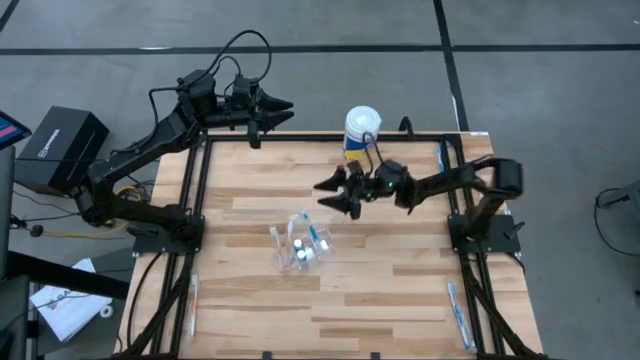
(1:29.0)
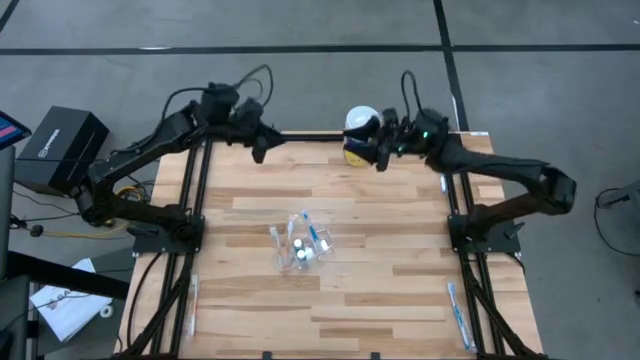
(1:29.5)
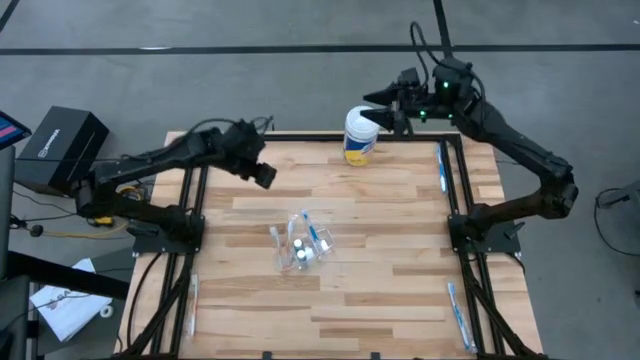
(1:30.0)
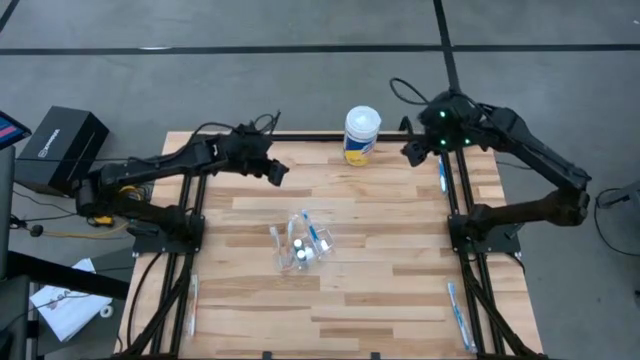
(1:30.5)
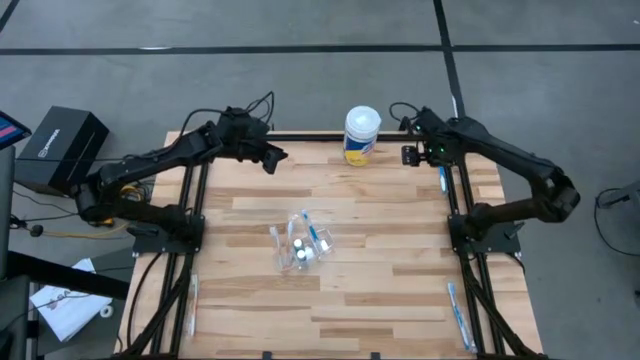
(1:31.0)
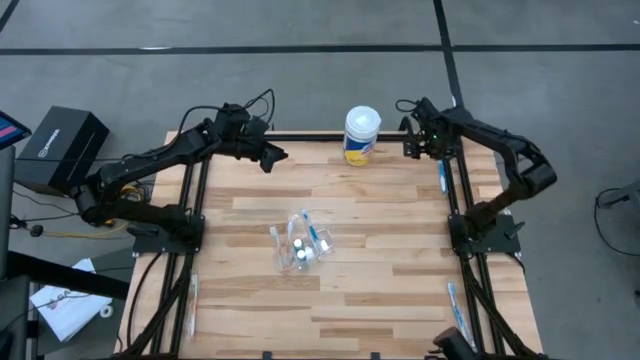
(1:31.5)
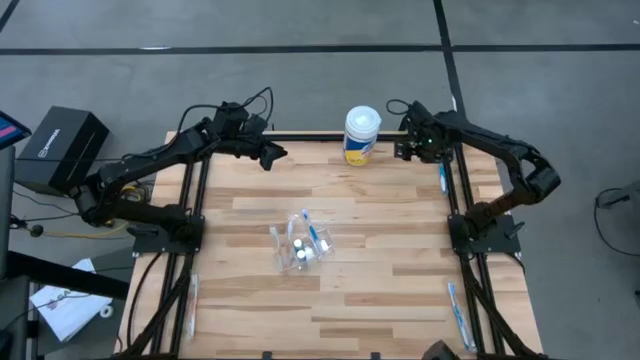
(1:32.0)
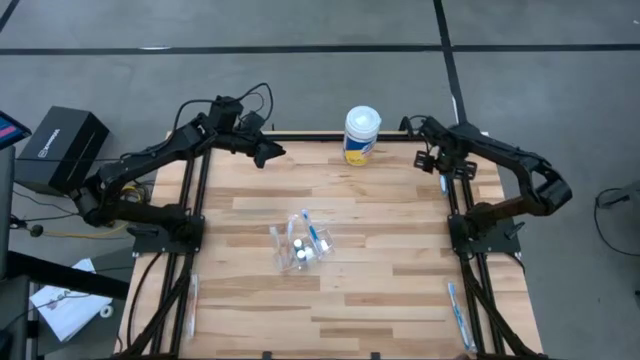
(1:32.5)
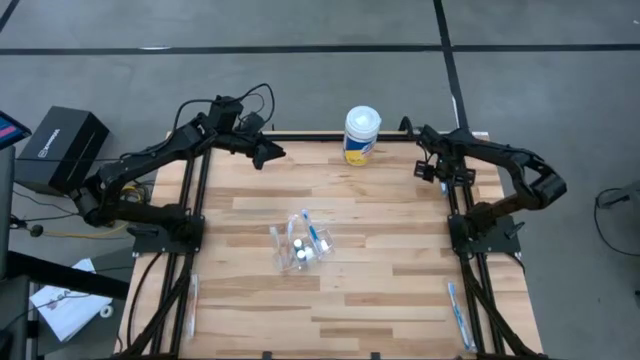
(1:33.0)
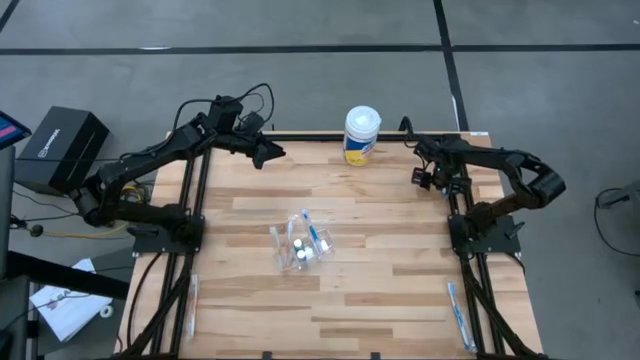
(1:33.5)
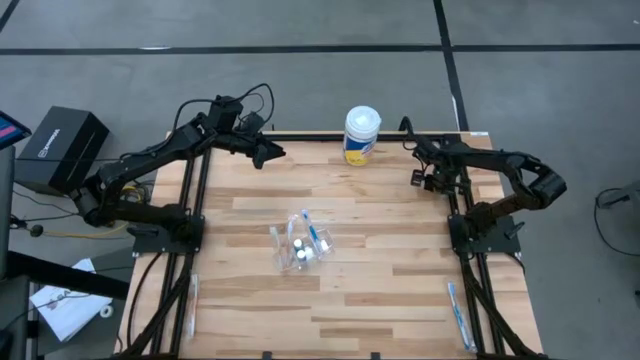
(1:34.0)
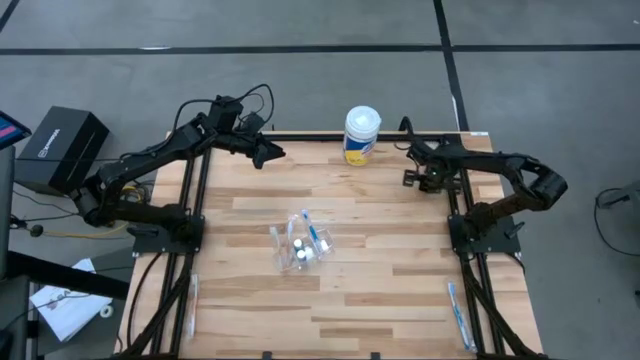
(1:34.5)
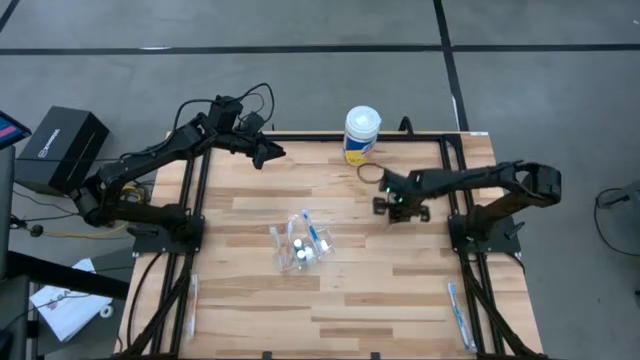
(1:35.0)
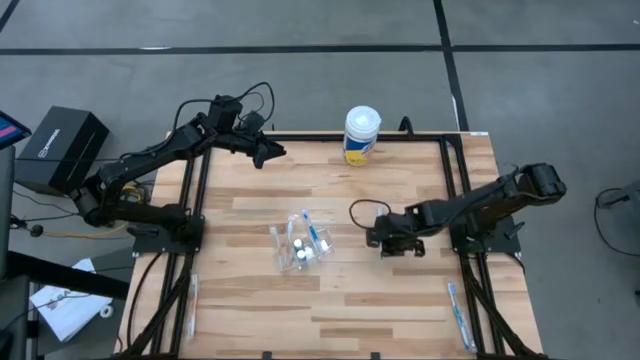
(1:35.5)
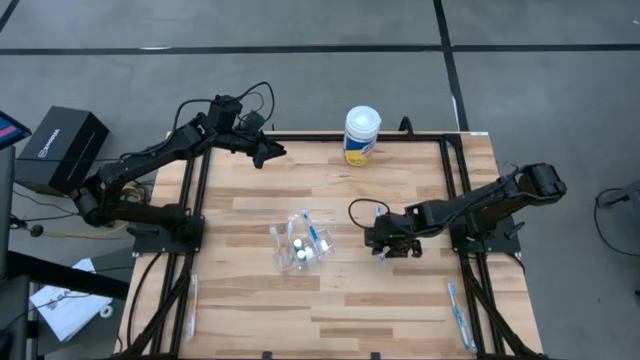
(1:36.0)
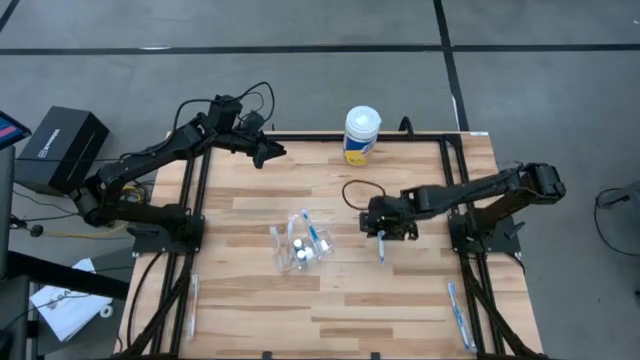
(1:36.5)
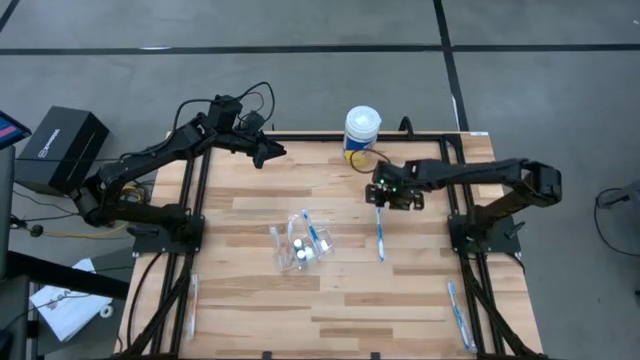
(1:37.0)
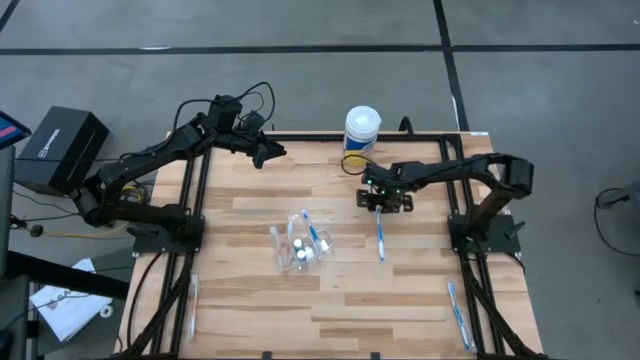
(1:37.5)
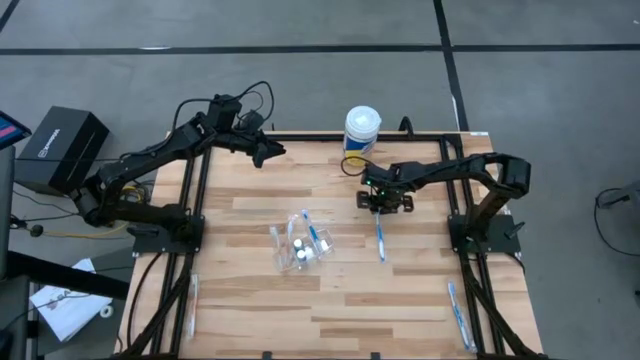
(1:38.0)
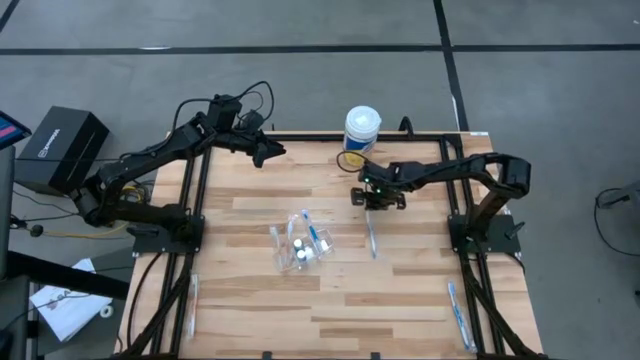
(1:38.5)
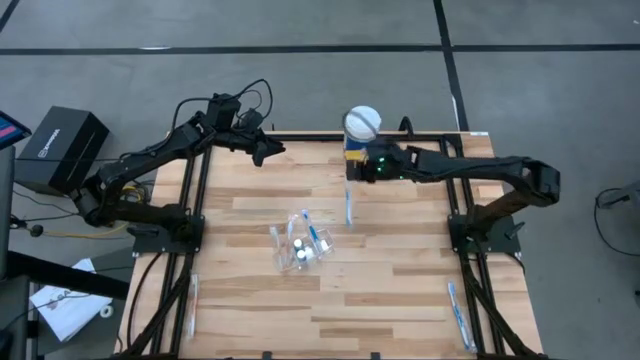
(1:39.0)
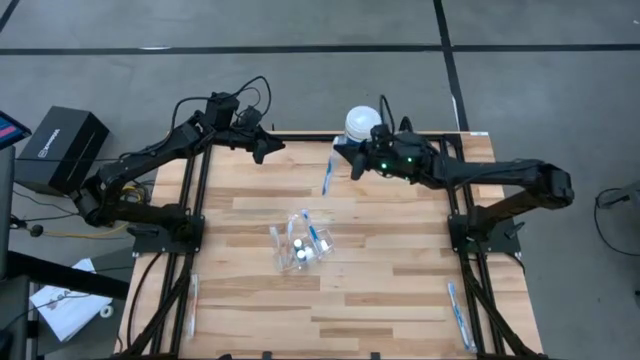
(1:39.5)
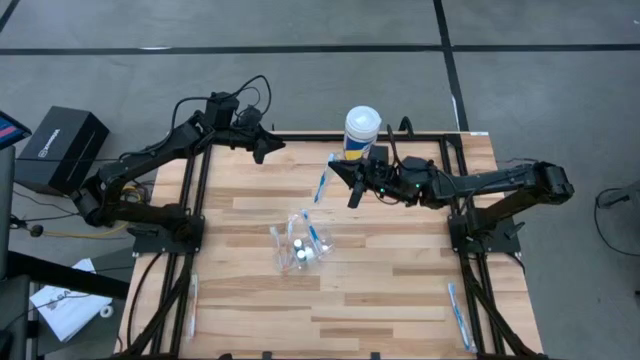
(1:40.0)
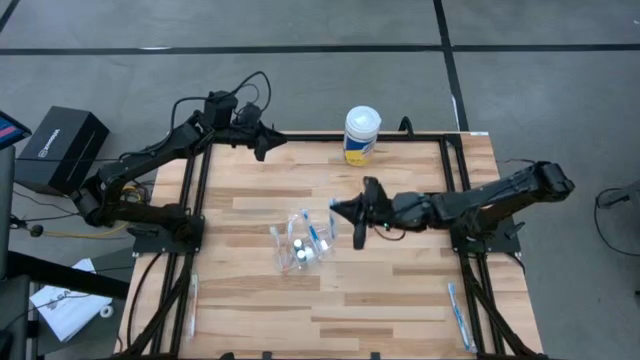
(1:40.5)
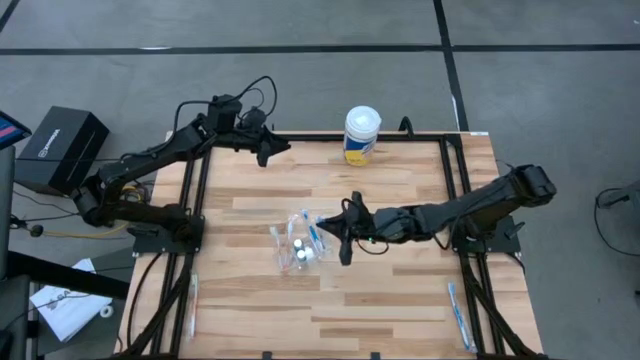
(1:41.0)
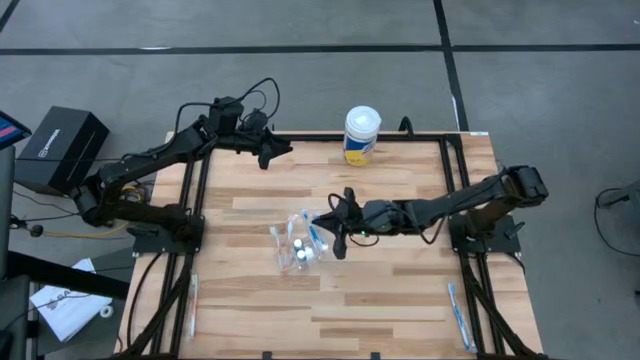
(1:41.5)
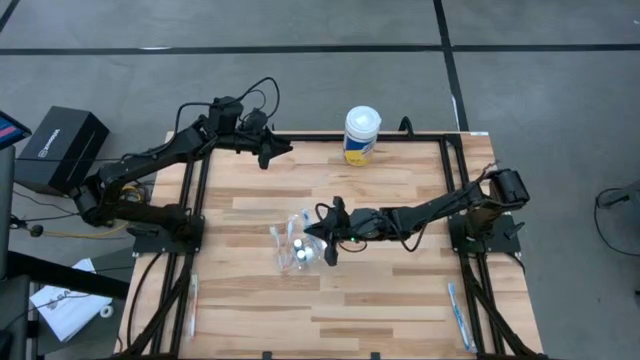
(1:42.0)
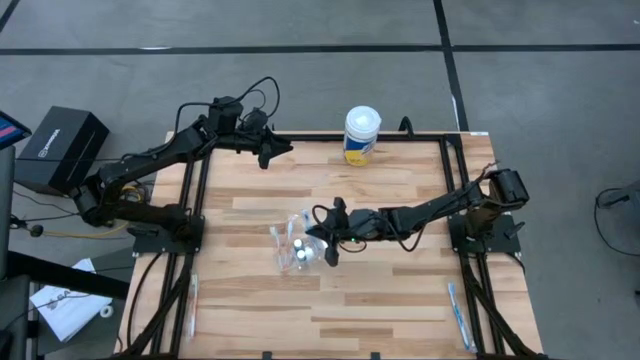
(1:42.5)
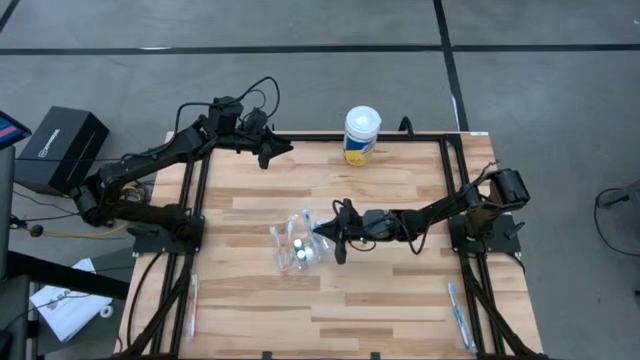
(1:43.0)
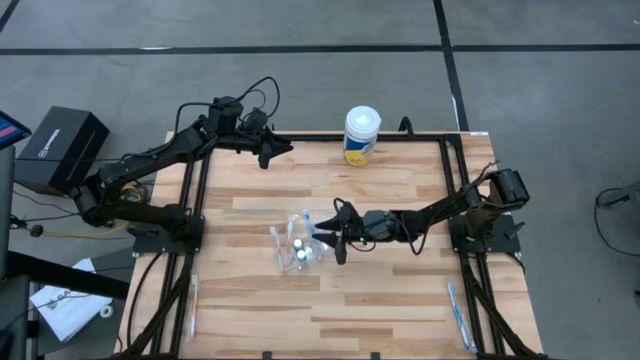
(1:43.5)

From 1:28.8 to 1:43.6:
Task: Pick & Place toothbrushing station
Put the top blue toothbrush into the transparent organizer

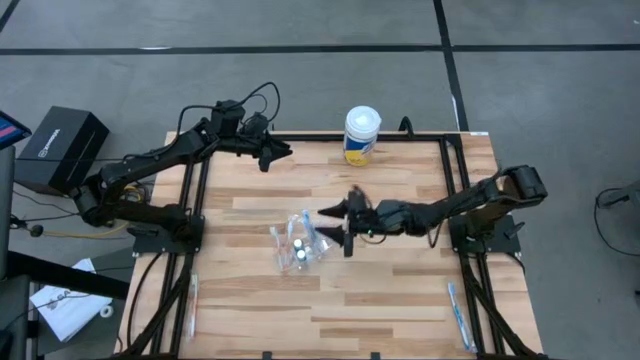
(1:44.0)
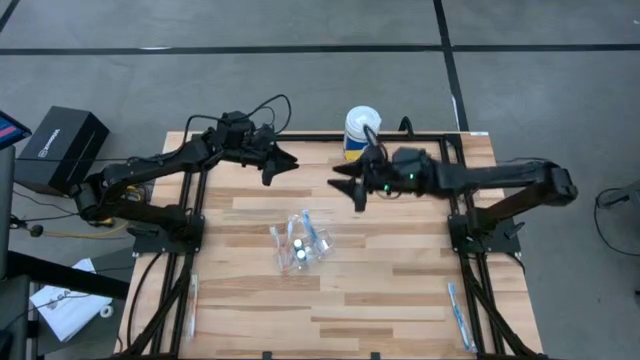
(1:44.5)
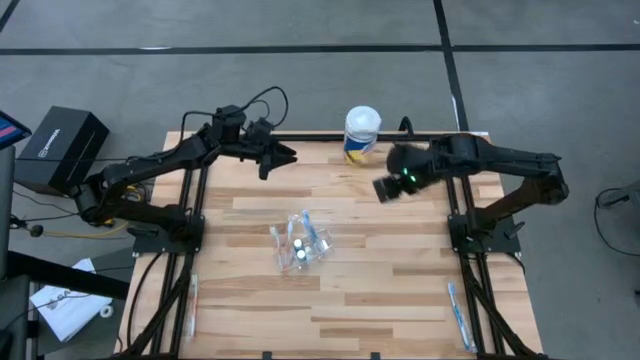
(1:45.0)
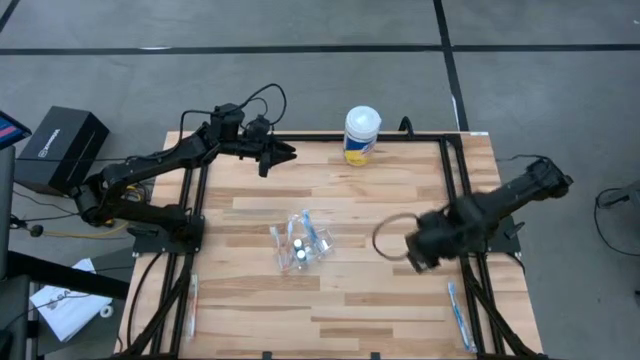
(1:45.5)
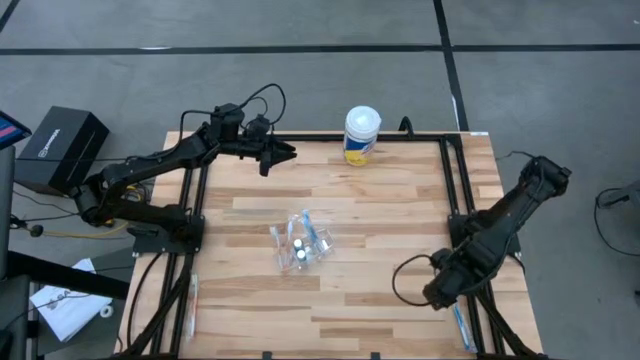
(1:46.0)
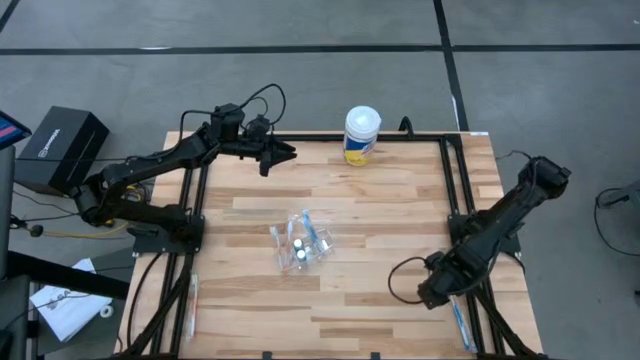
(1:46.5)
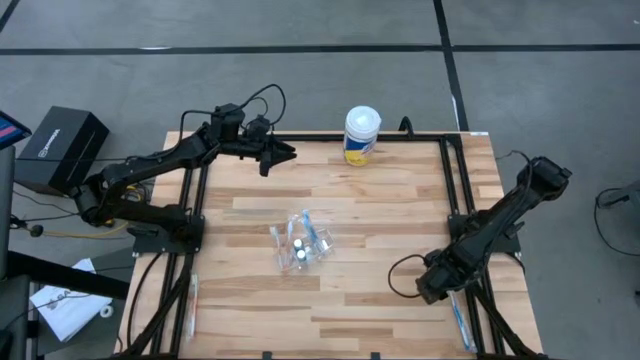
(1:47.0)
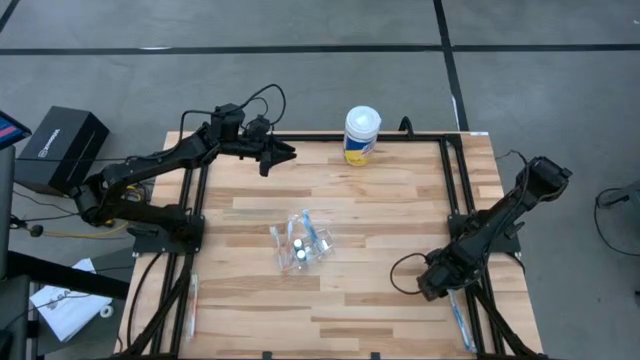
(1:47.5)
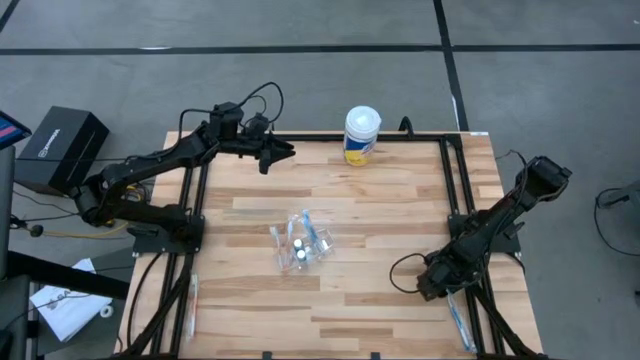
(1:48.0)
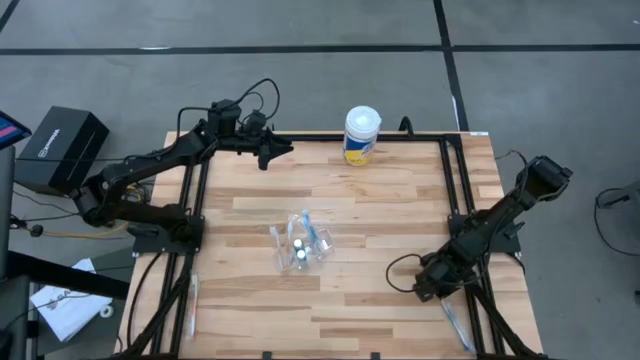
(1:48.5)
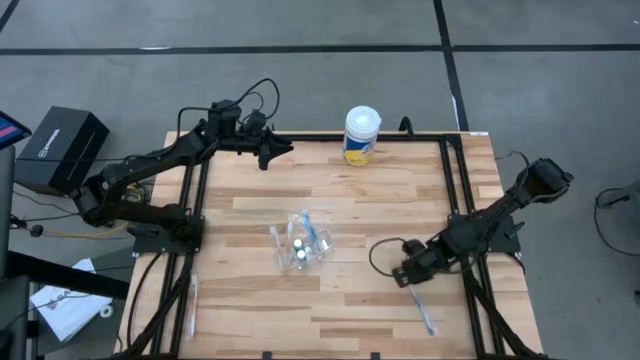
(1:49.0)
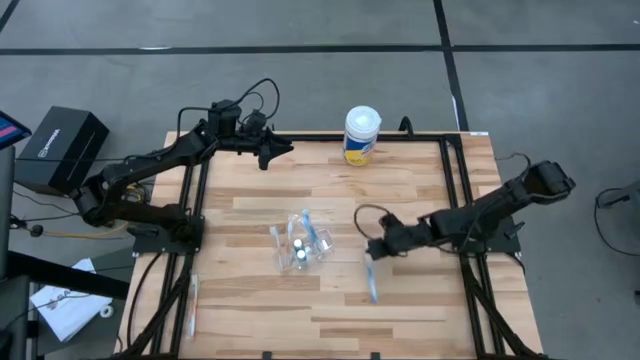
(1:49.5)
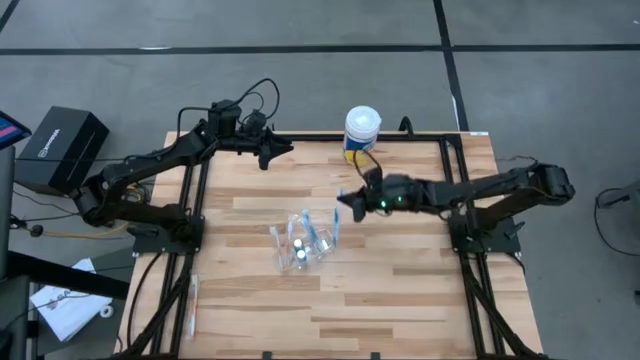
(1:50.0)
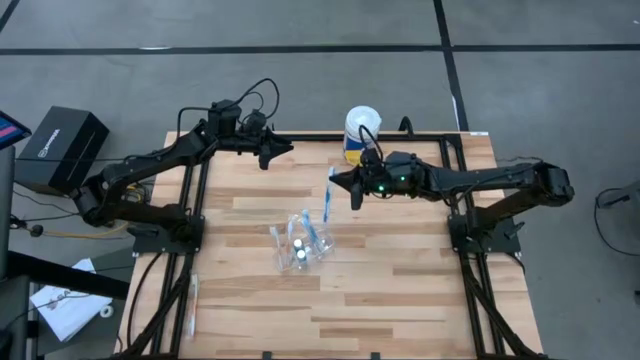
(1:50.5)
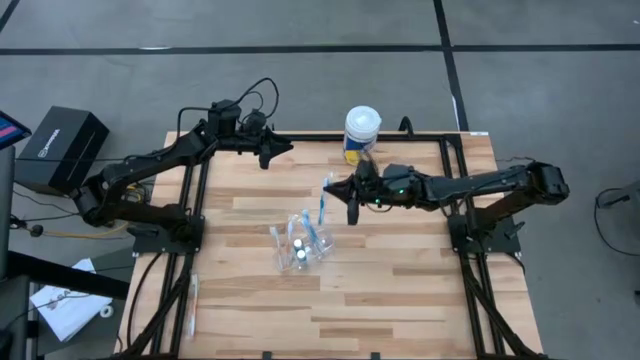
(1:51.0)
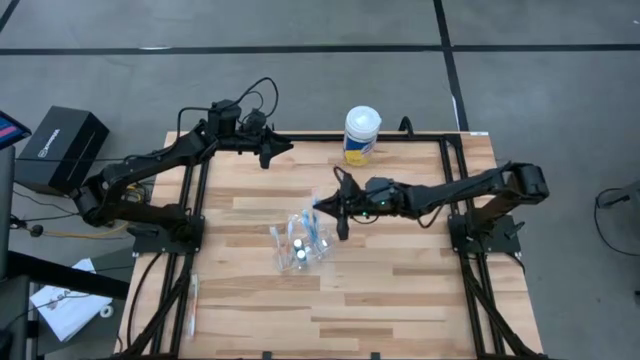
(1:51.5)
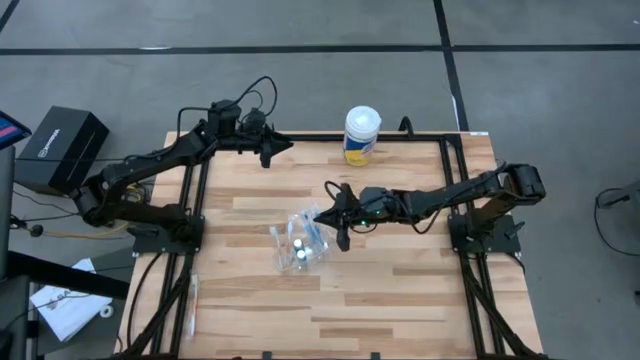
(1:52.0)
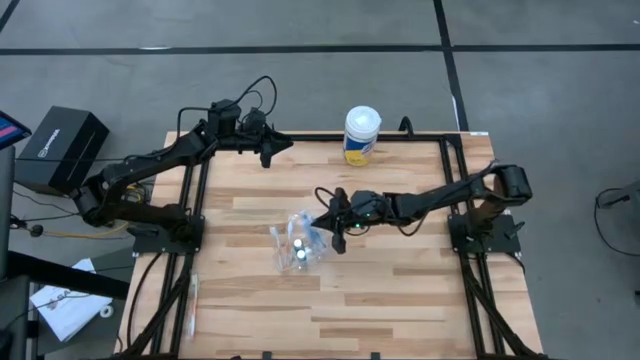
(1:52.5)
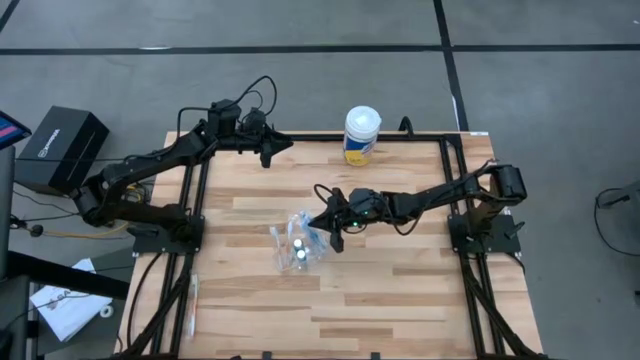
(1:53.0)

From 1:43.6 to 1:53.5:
Put the blue toothbrush into the transparent organizer
